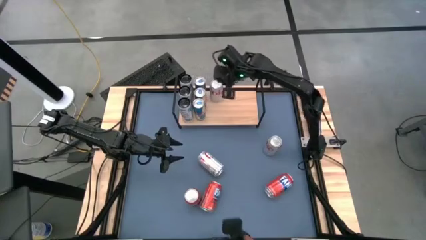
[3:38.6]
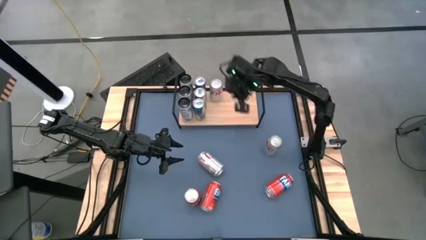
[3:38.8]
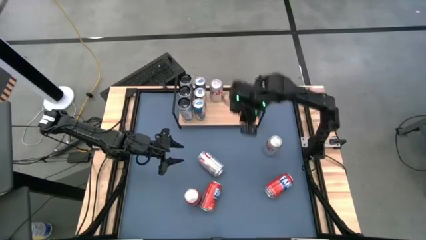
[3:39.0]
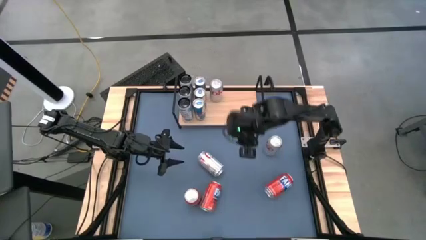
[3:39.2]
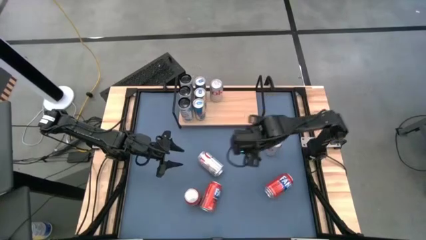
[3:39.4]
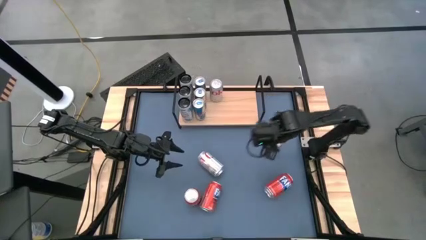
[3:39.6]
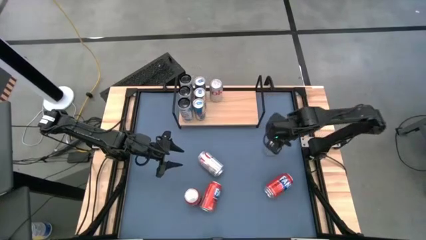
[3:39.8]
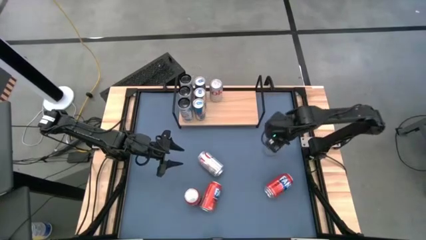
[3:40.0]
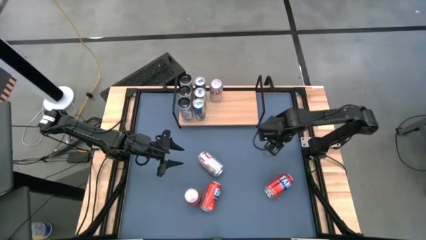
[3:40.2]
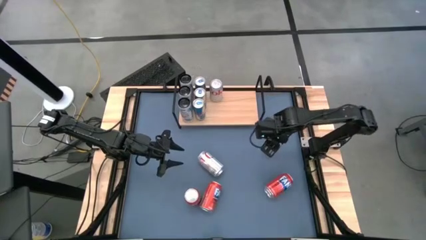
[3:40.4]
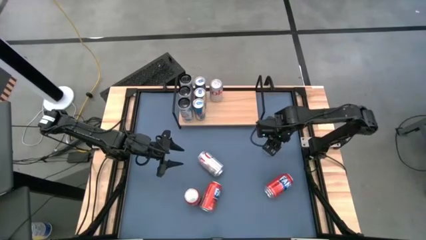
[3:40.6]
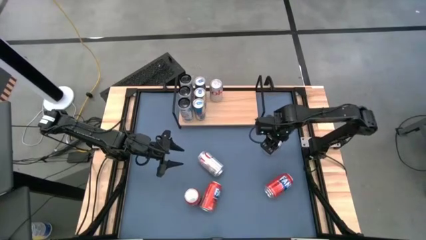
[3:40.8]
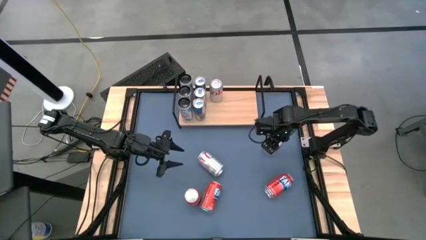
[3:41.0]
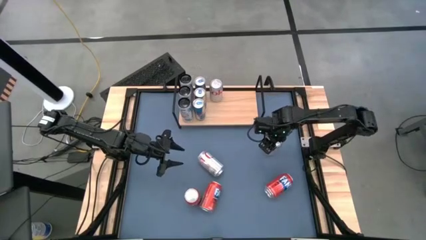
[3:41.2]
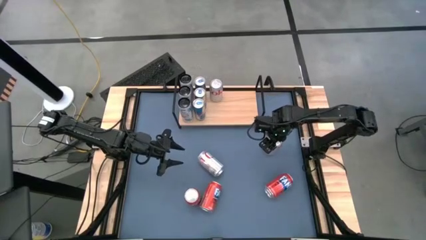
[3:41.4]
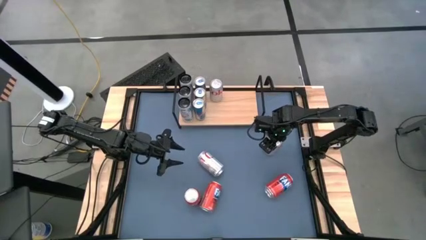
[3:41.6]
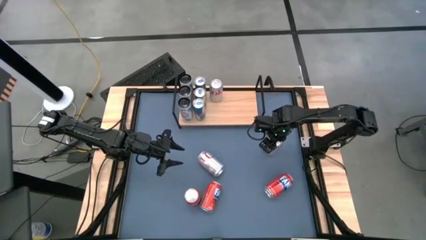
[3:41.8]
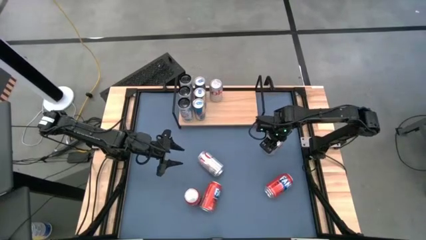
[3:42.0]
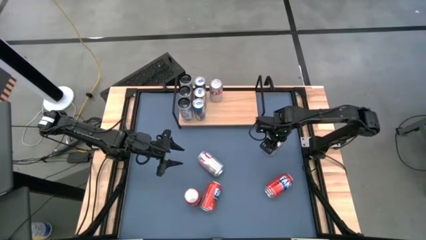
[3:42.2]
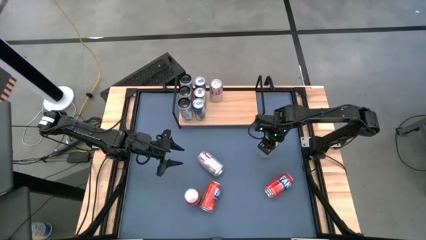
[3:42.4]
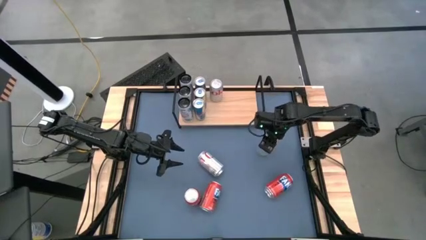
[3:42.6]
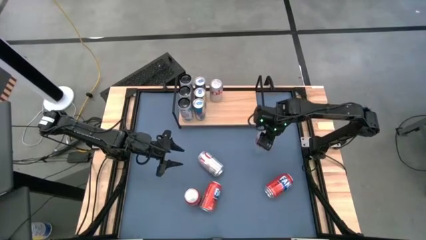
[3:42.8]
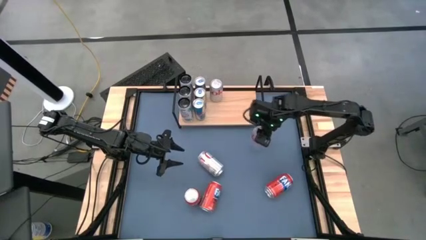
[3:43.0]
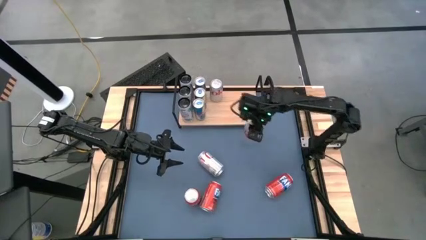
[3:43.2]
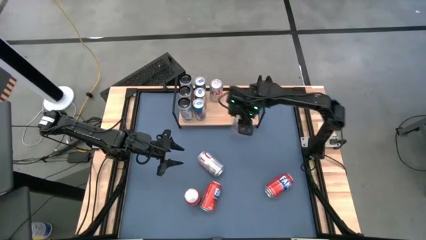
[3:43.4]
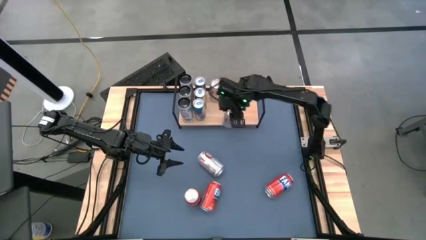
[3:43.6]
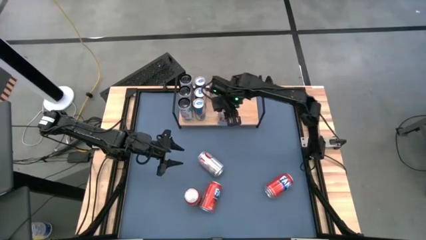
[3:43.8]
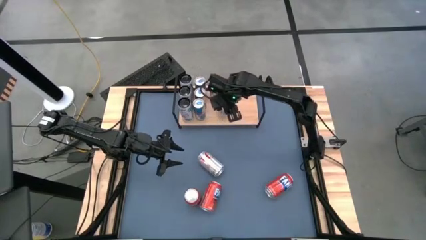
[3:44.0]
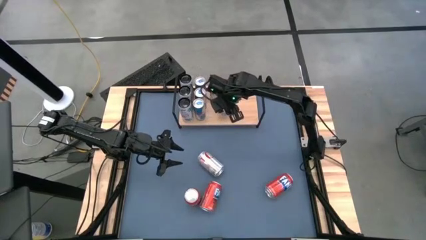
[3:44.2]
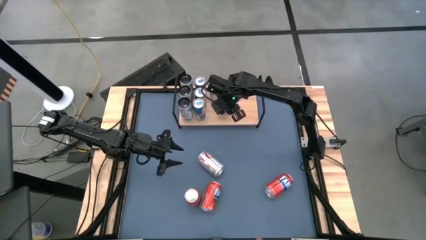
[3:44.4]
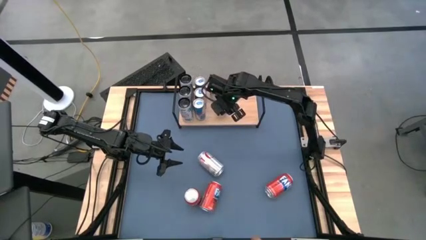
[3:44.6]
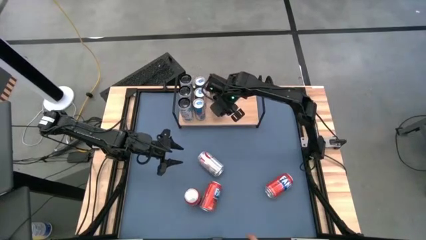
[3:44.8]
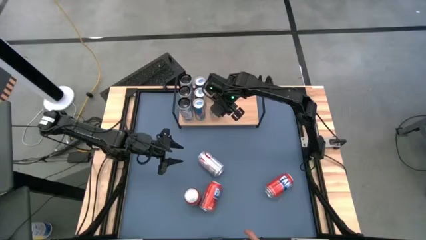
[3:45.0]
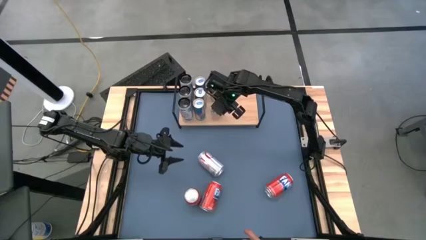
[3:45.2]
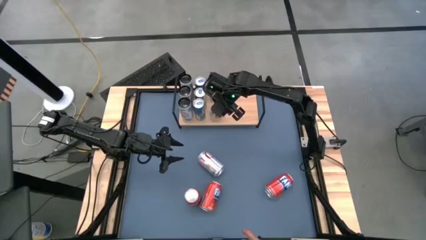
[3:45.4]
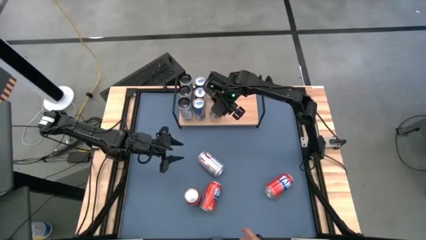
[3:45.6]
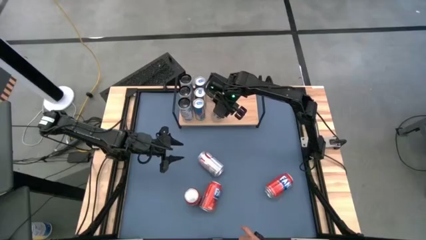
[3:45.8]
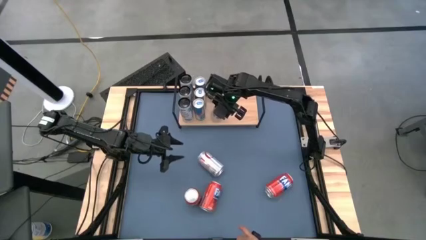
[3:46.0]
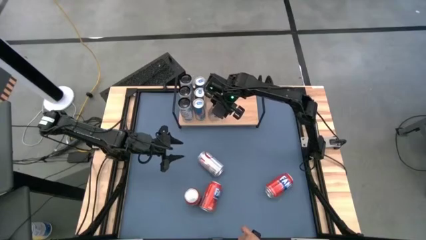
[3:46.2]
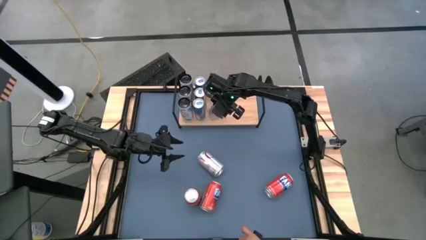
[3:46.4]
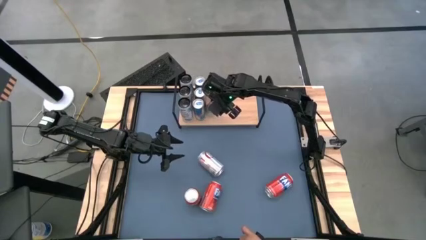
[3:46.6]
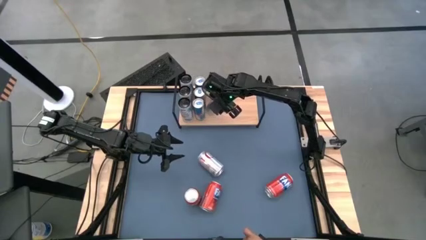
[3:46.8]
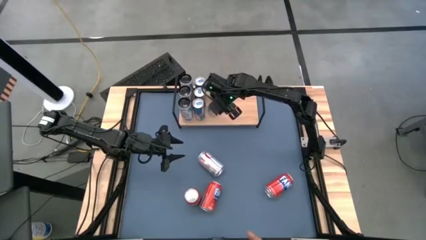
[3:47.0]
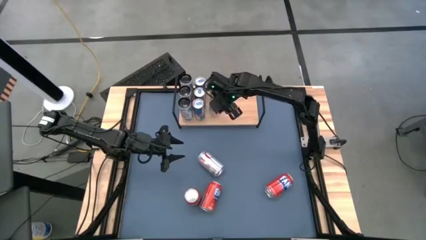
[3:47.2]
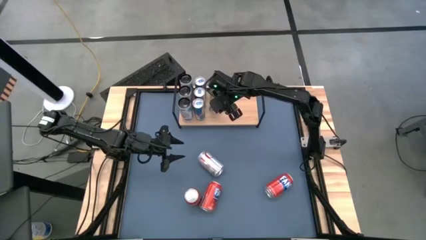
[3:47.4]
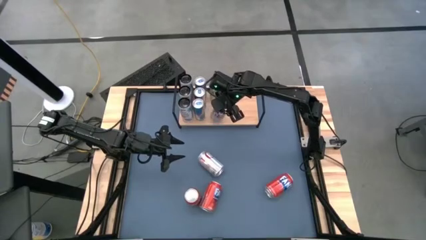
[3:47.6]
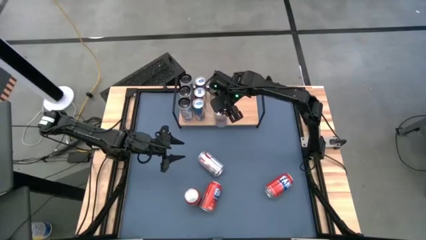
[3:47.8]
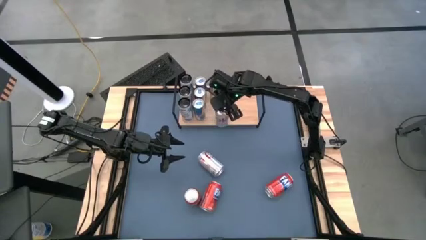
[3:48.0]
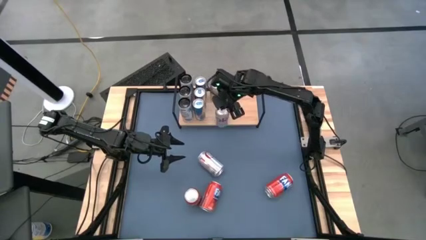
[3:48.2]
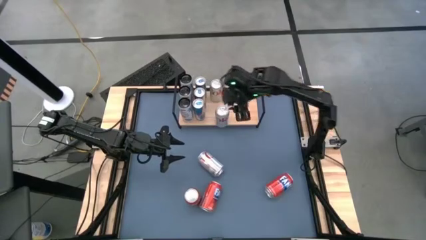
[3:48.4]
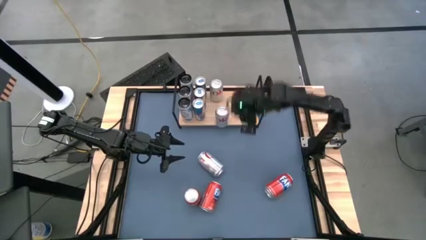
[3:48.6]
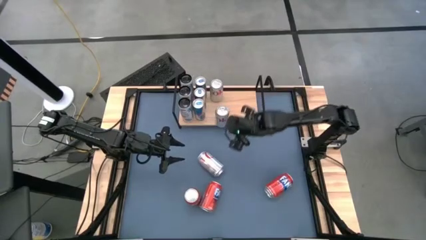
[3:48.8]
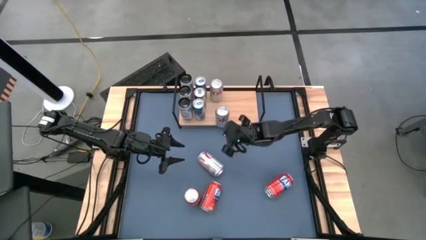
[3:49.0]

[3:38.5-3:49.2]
Task: Place canned beverage on shelf
Put the right silver soda can aligned with the other silver soda can on the shelf

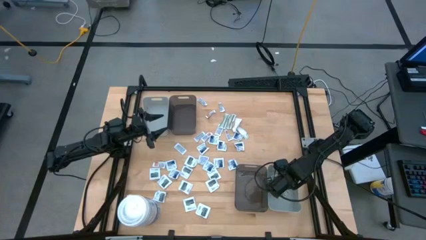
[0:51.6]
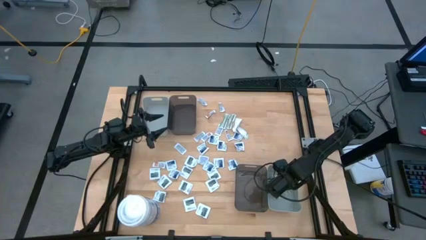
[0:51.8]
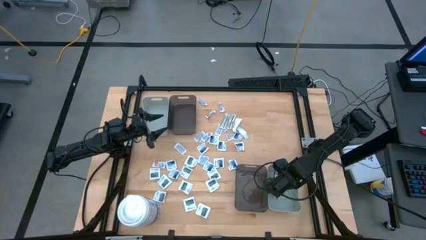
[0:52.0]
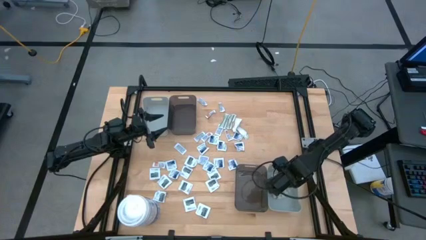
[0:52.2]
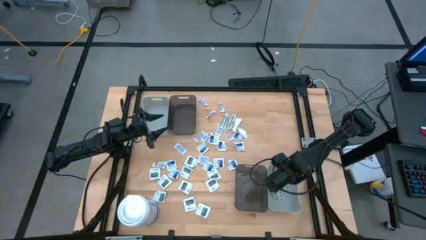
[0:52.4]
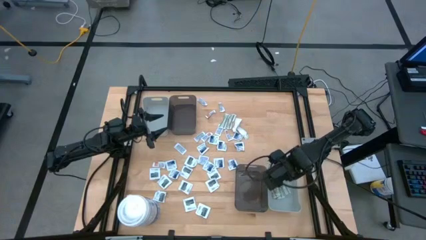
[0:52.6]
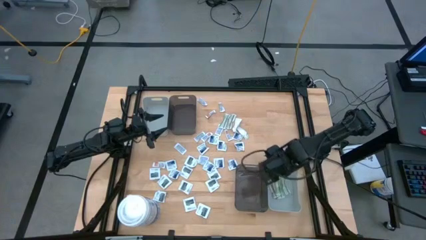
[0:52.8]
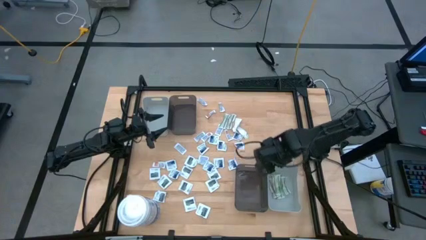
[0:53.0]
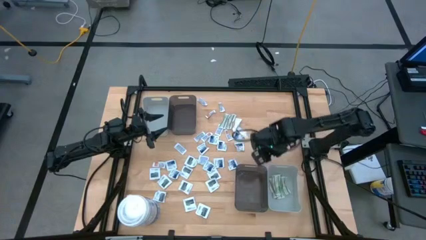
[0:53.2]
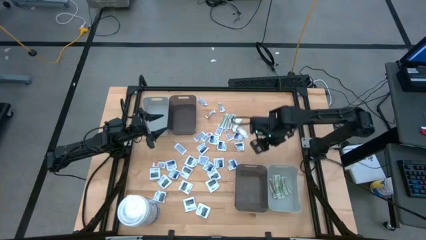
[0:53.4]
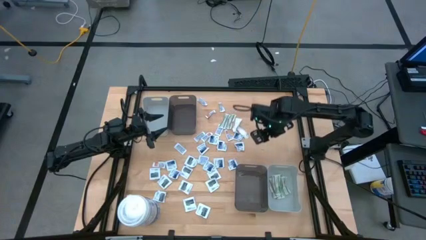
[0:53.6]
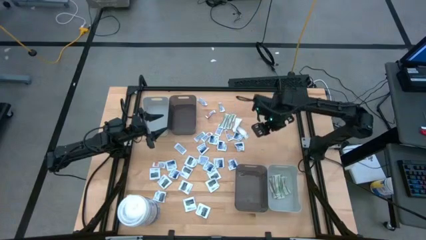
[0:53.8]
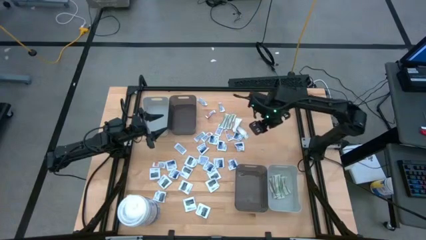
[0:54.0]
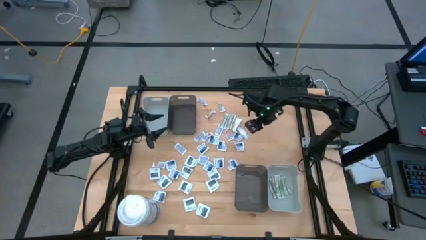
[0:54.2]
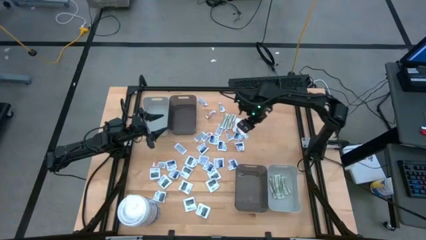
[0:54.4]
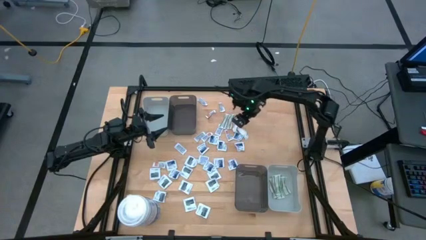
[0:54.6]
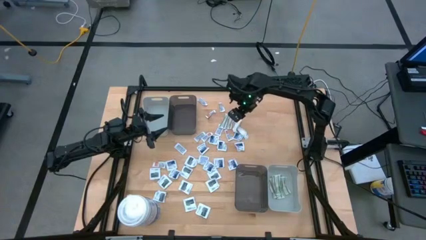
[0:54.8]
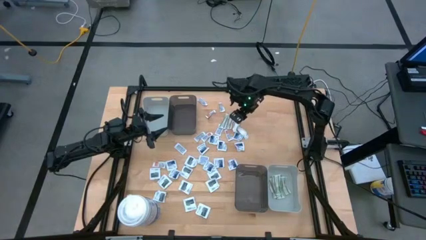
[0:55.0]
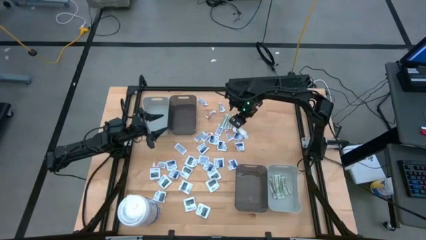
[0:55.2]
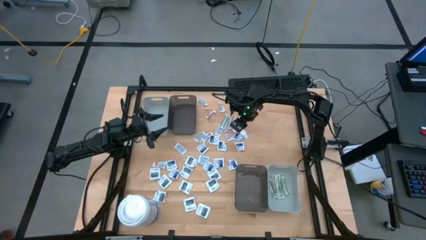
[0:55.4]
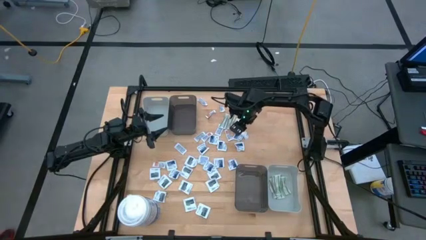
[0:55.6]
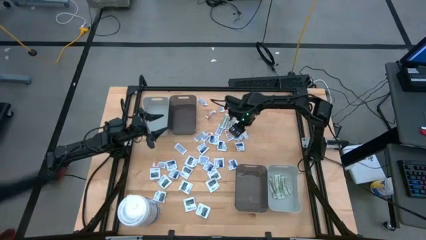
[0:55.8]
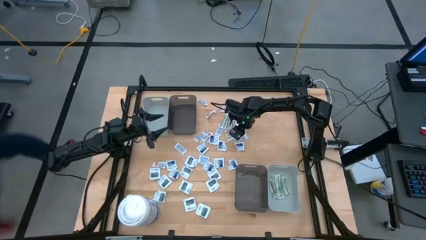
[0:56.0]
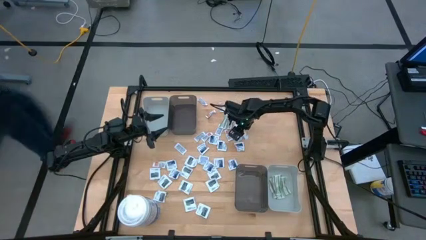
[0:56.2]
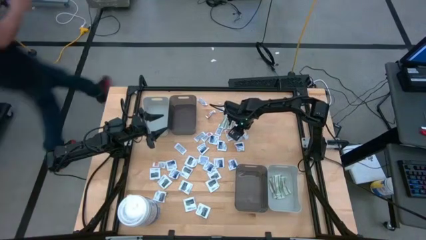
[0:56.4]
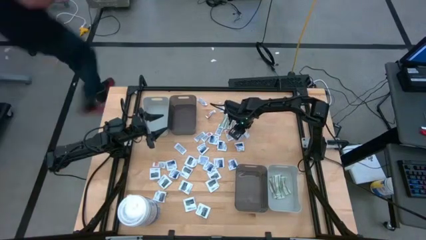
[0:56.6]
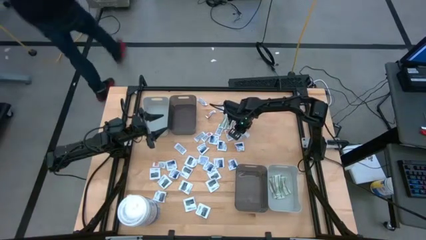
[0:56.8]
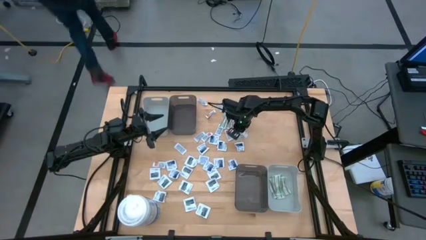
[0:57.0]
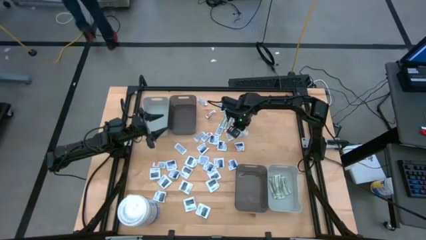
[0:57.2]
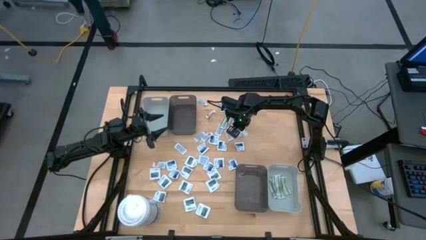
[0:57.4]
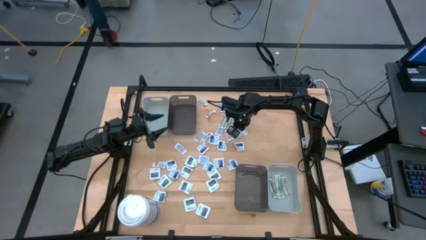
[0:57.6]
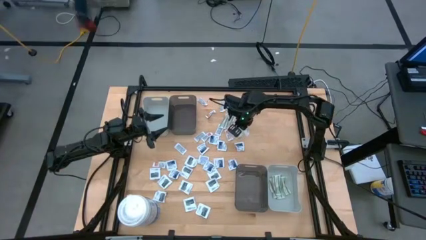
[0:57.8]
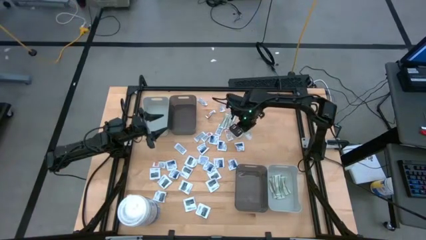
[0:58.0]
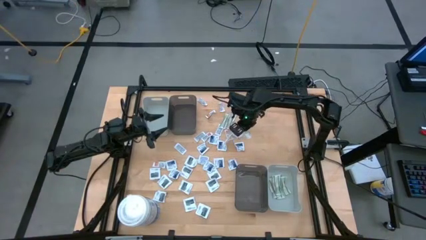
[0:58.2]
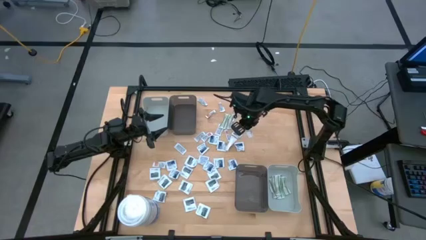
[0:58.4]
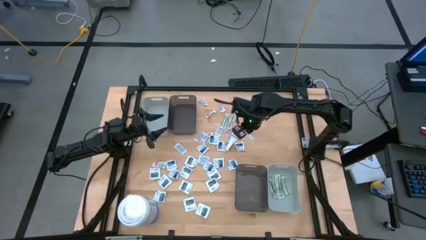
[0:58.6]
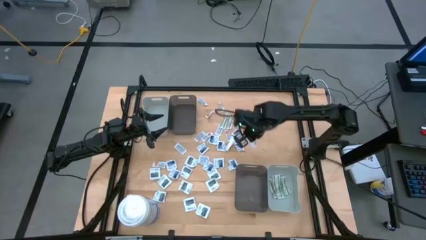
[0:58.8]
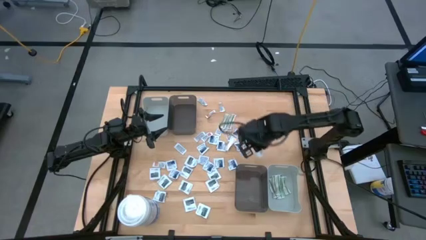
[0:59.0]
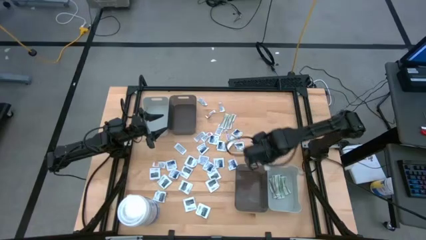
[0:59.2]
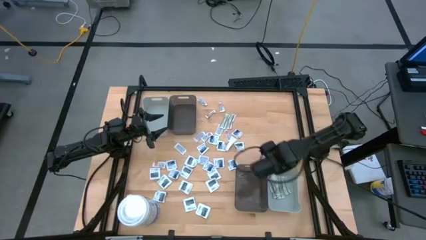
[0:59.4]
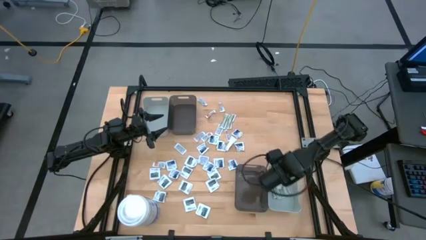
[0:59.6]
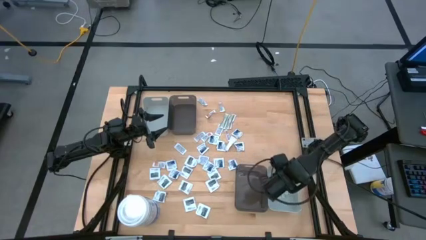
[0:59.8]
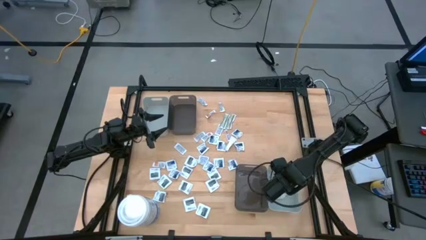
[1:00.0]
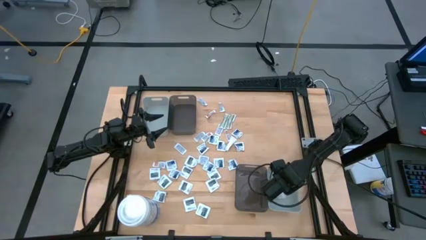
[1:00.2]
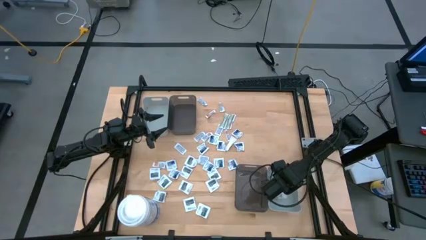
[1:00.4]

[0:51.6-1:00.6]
Task: Pick & Place First Aid Supplies
Put the white bandage pack into the bottom gray bin
